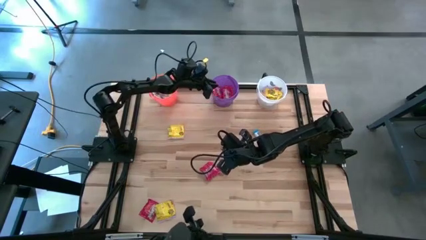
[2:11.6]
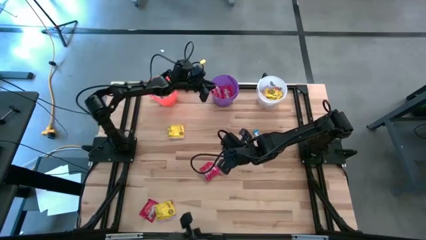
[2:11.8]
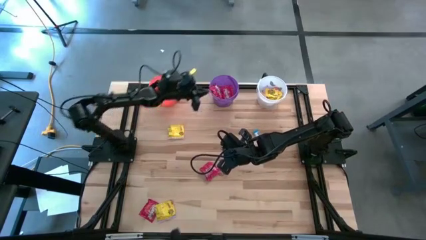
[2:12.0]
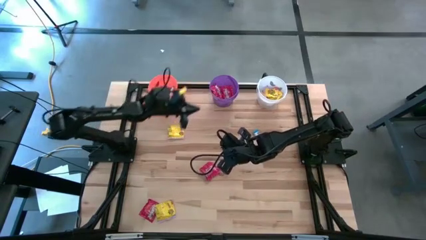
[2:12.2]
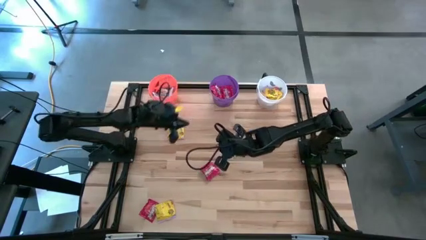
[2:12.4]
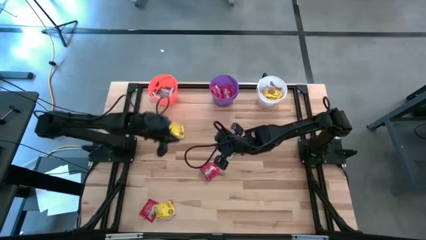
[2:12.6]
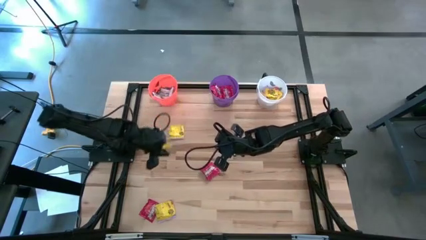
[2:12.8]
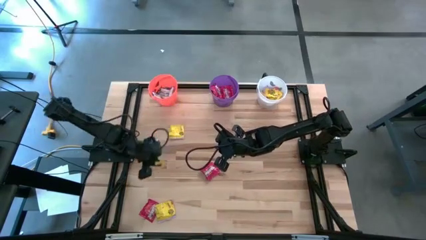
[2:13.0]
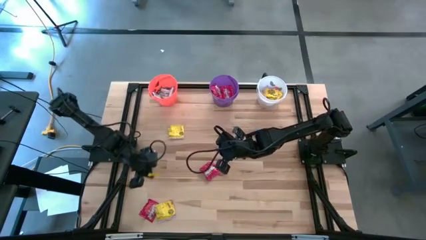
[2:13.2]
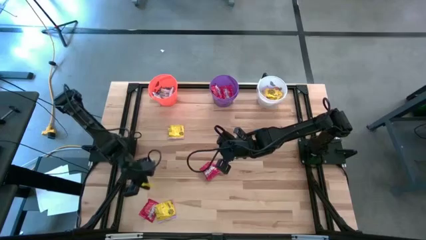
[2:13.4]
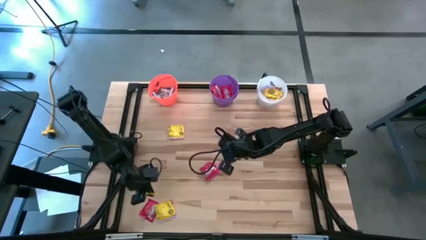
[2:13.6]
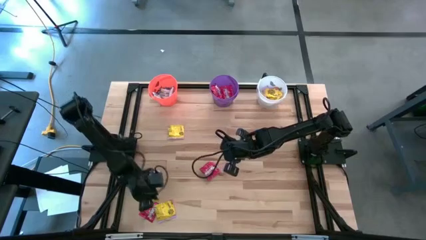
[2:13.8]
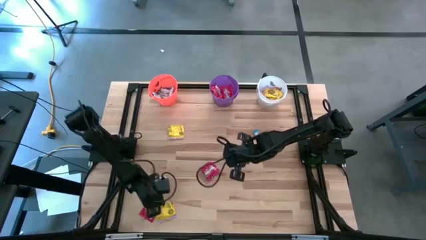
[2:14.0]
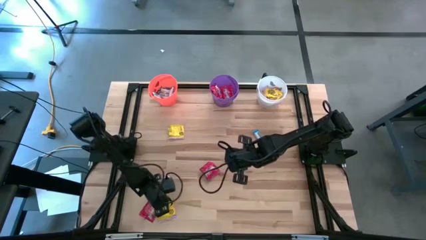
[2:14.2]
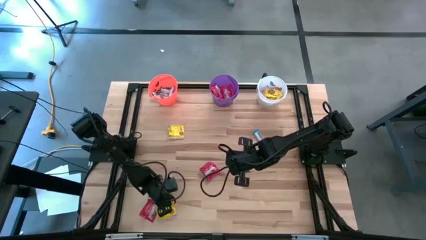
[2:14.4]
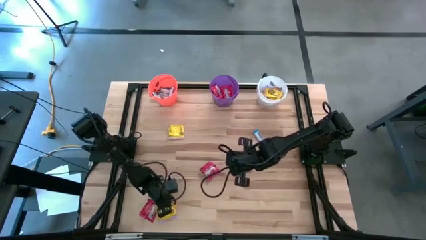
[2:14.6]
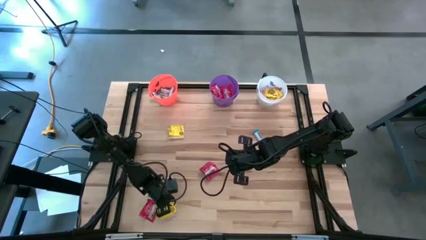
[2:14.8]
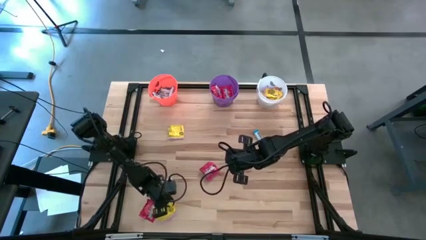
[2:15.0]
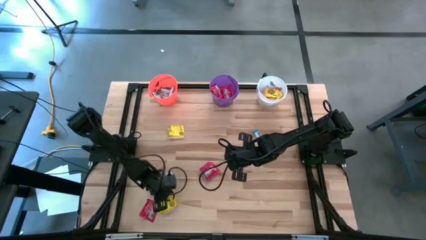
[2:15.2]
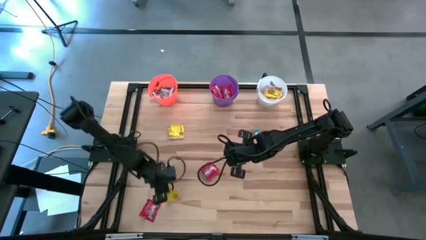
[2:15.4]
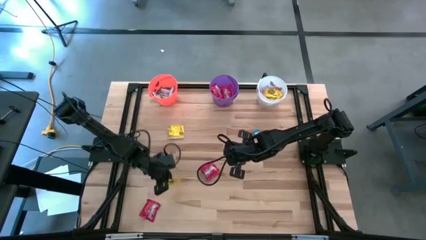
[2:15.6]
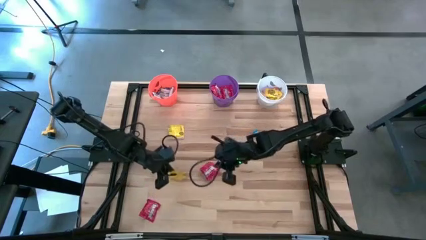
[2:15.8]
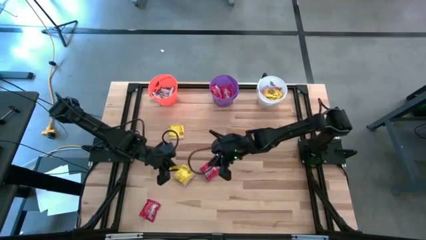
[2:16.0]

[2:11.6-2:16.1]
Task: Sort candy
Put the yellow candy into the white bucket

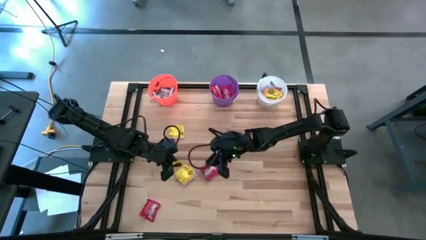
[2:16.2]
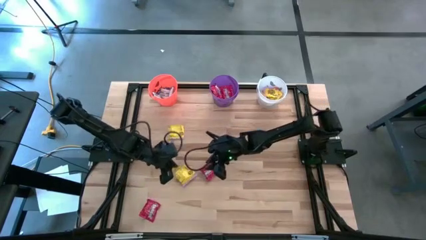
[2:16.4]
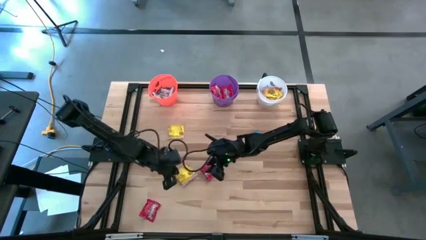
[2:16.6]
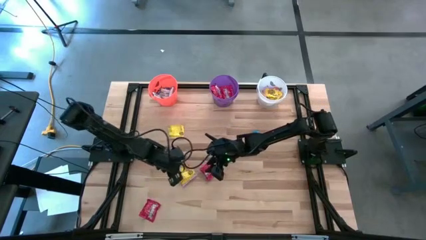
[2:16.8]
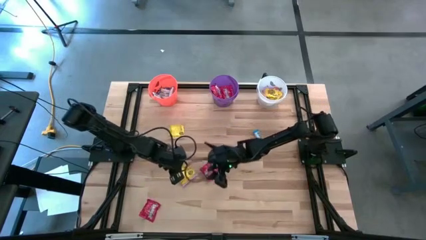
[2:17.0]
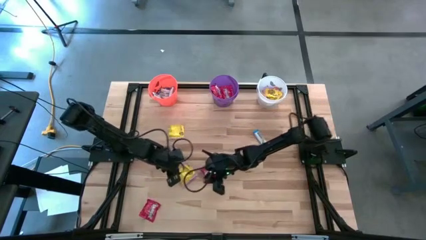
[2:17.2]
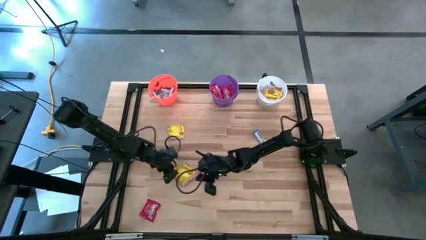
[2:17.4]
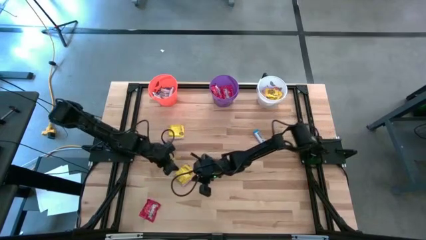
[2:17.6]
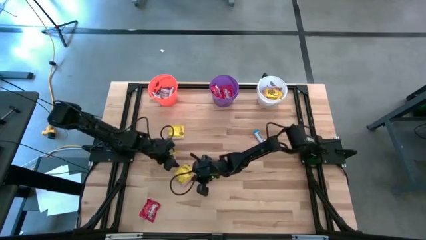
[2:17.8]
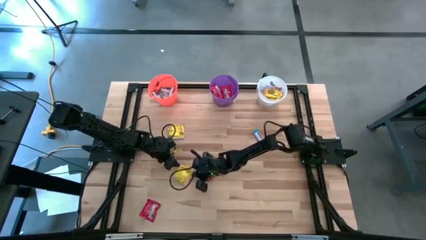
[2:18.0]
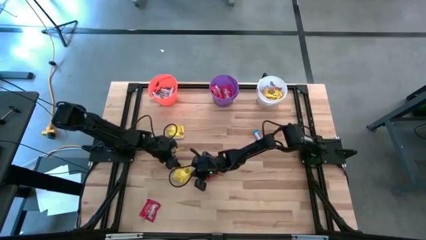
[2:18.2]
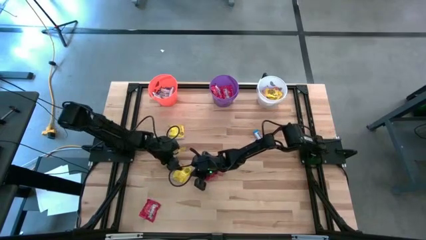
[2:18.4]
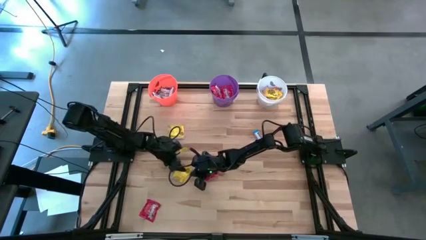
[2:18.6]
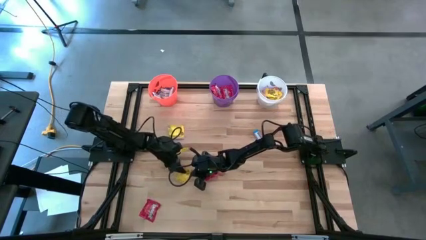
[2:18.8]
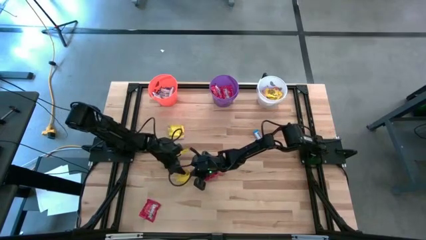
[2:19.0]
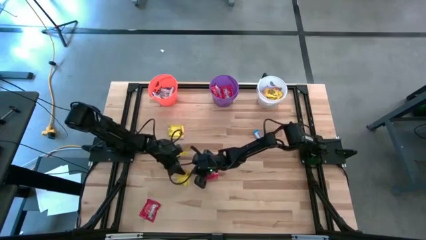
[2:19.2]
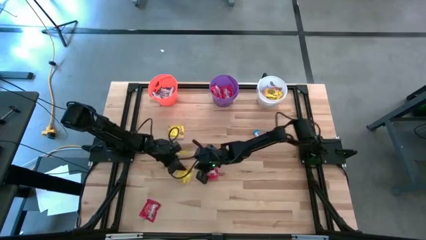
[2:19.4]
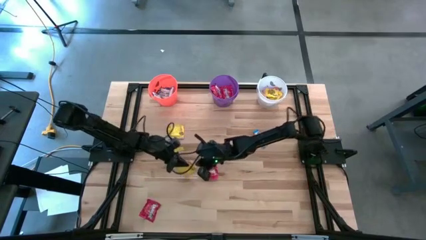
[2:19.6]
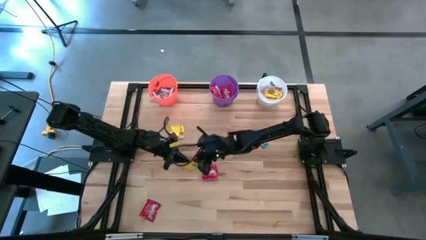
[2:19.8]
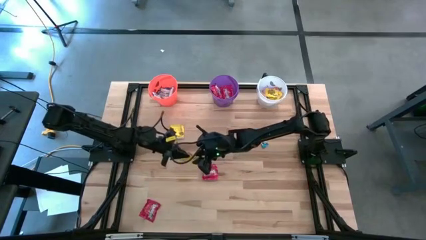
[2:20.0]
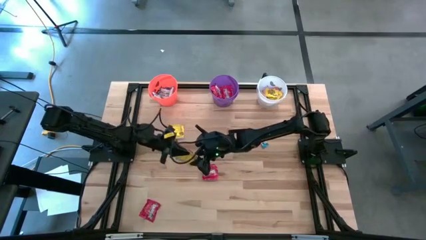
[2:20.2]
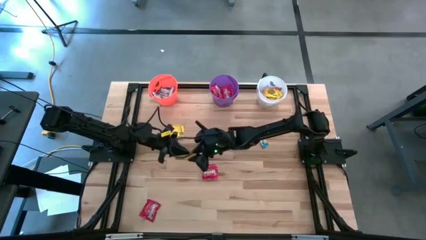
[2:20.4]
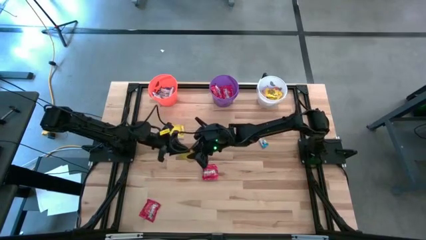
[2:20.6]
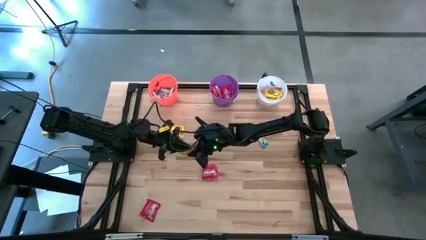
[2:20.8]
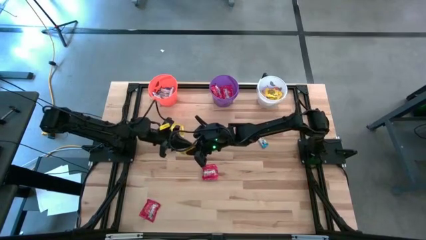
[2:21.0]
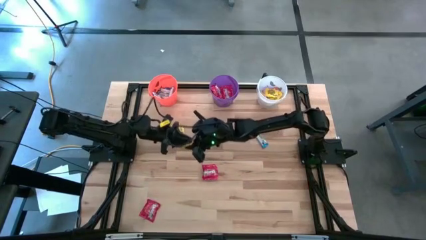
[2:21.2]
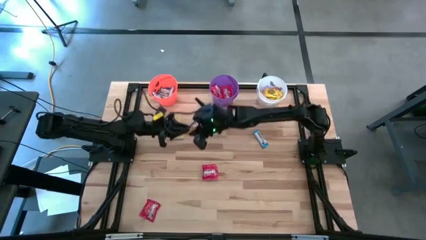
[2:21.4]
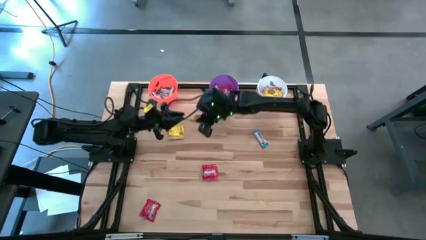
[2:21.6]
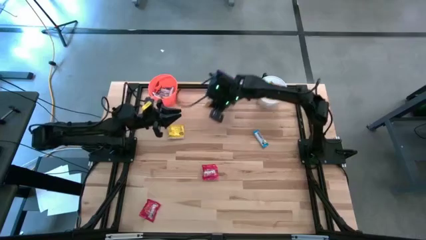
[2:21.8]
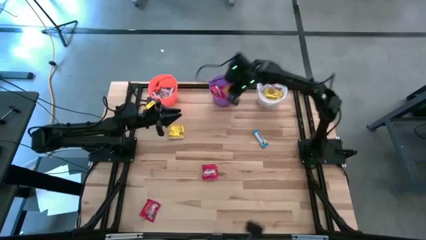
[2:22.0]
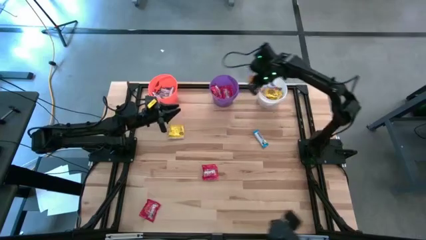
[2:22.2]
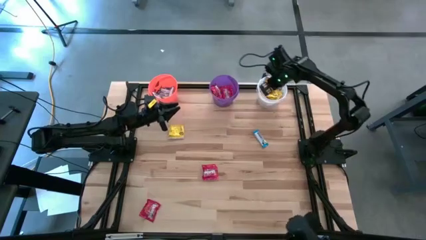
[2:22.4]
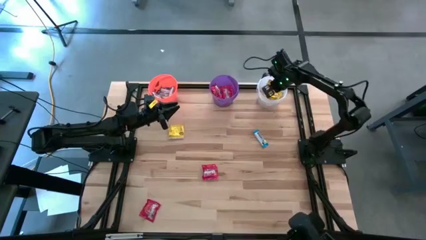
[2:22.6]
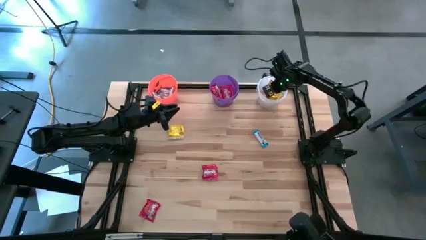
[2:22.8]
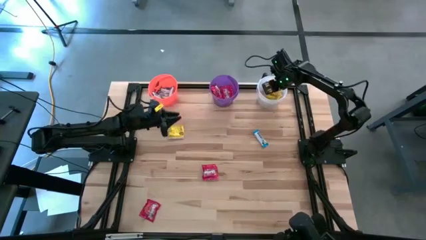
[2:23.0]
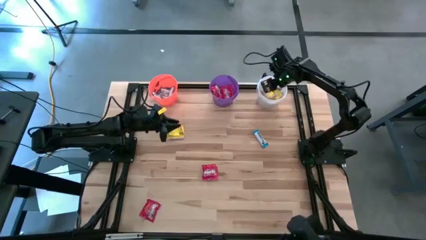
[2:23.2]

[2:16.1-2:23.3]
Put the yellow candy into the white bucket

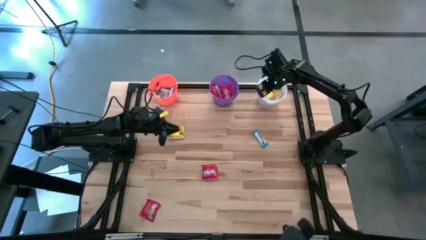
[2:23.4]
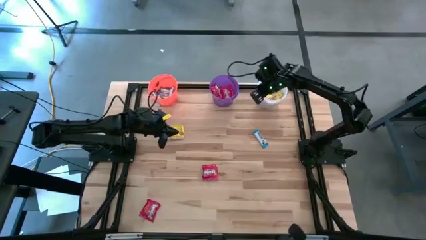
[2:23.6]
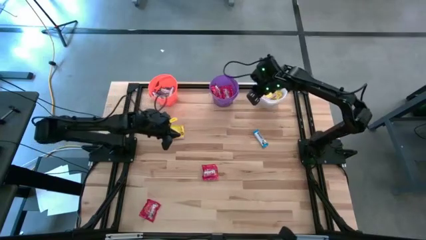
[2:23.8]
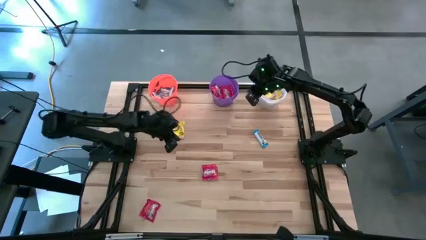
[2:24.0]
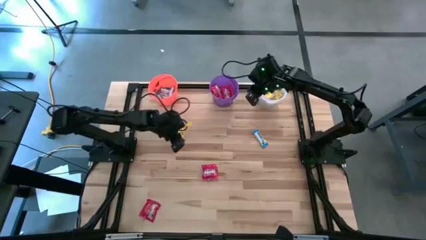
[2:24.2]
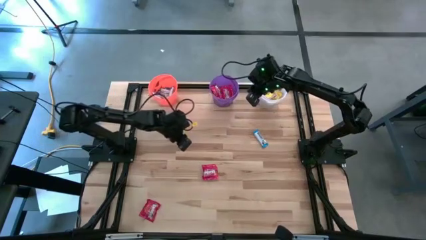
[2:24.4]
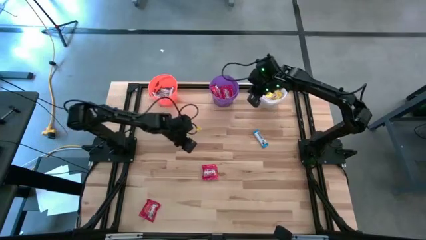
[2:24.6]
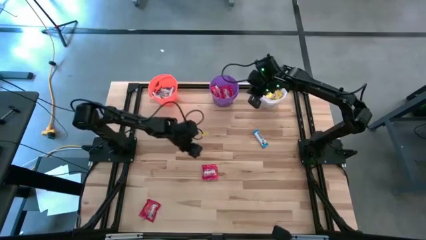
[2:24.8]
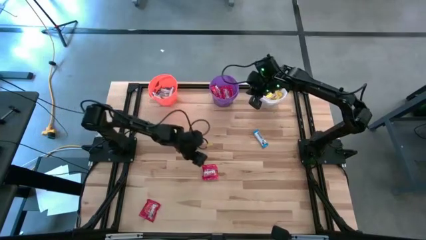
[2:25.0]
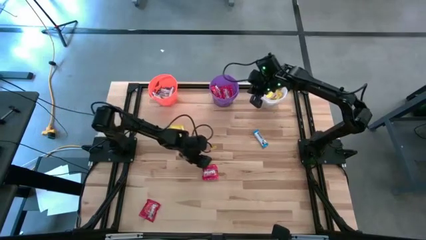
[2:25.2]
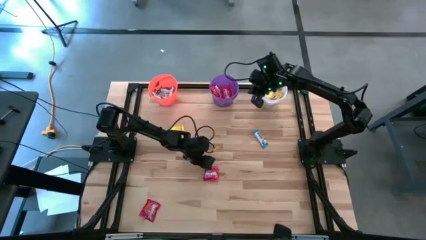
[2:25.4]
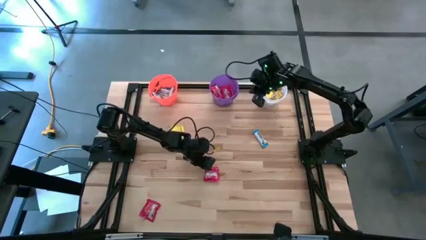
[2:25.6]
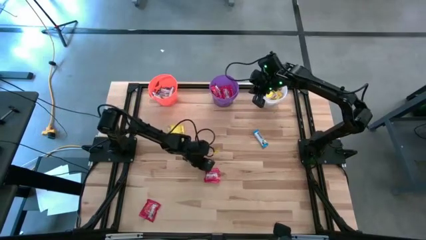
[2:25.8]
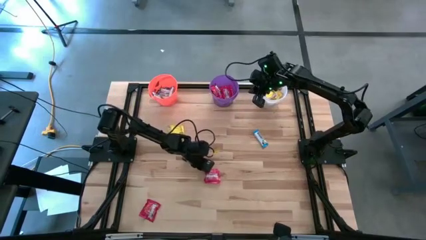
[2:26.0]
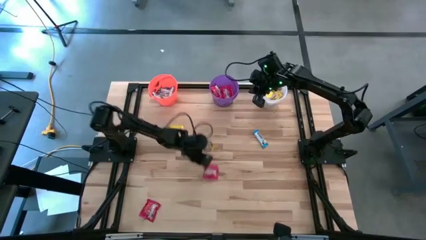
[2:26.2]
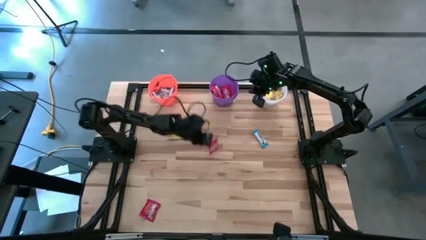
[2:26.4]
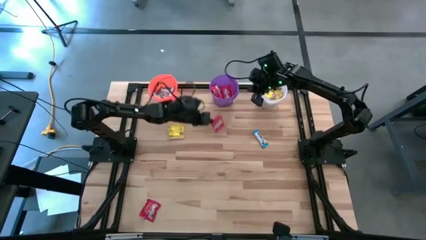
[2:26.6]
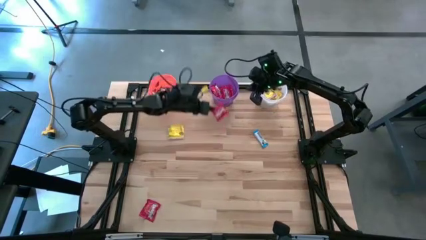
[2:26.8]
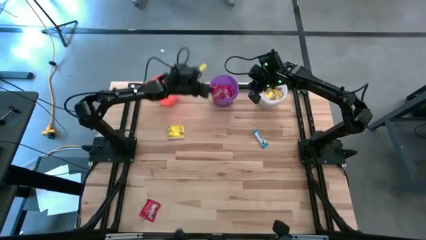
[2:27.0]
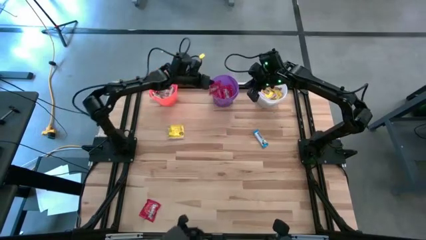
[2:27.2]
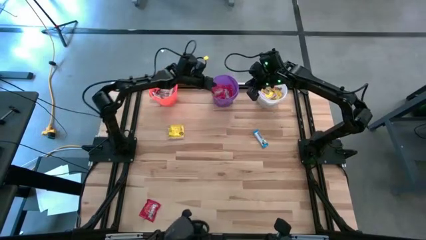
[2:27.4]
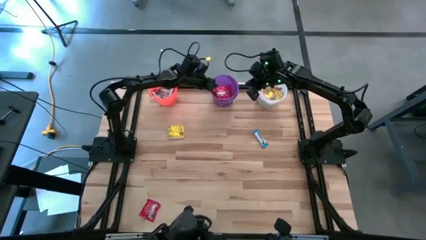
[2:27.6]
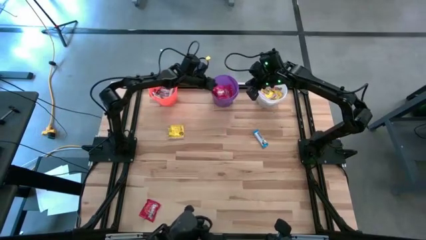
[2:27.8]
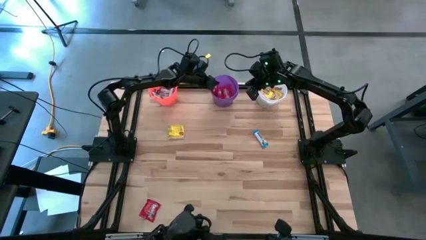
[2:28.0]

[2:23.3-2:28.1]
Put the red candy into the purple bucket
